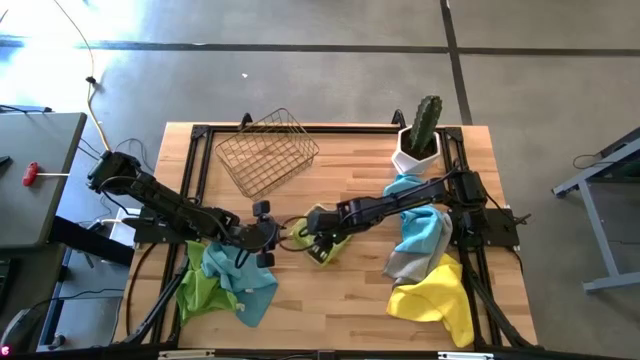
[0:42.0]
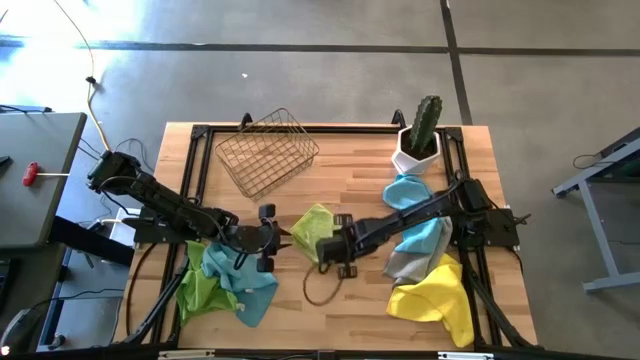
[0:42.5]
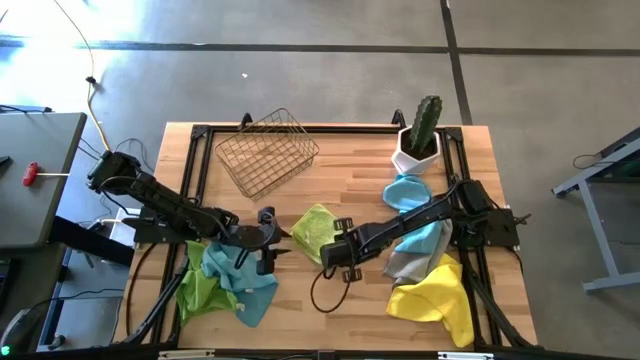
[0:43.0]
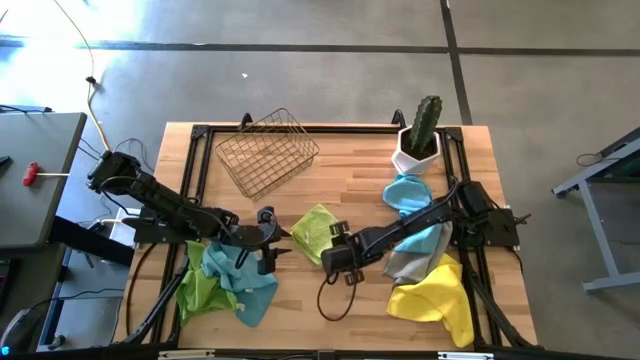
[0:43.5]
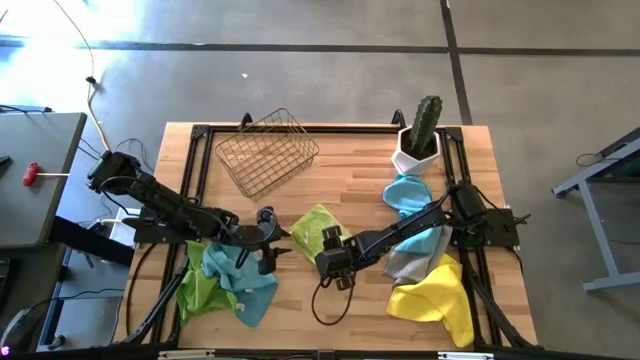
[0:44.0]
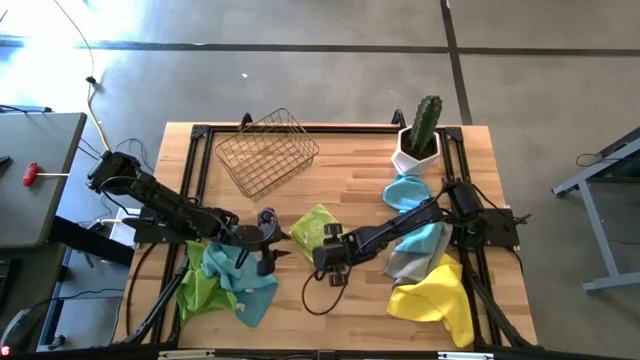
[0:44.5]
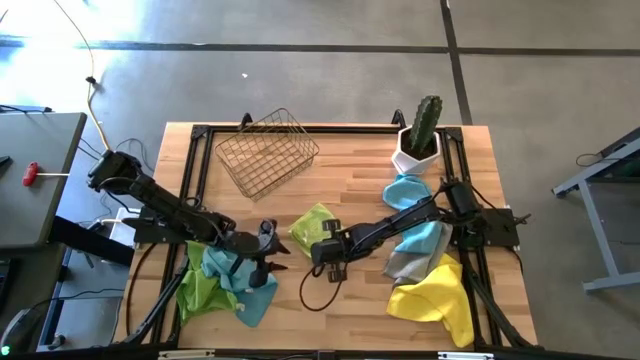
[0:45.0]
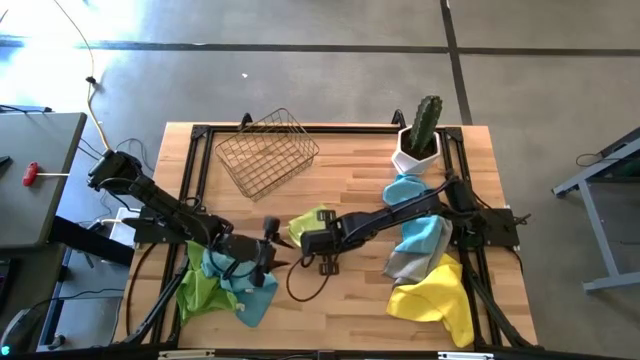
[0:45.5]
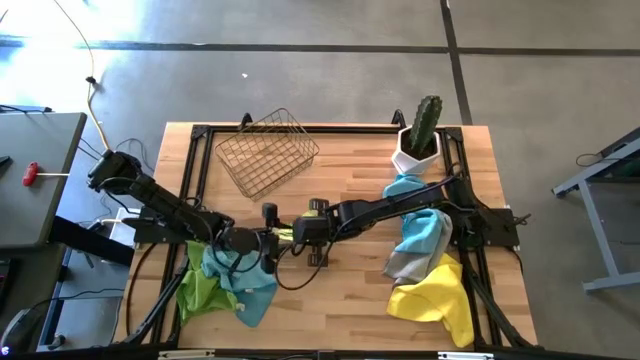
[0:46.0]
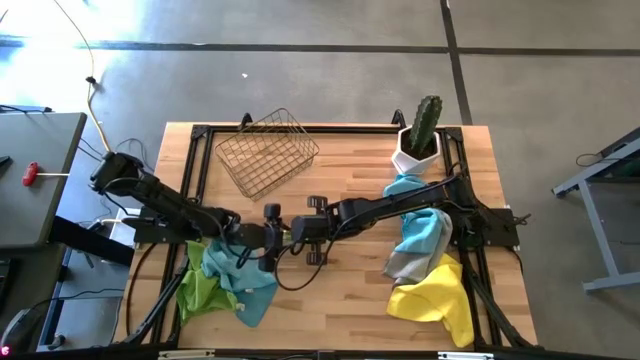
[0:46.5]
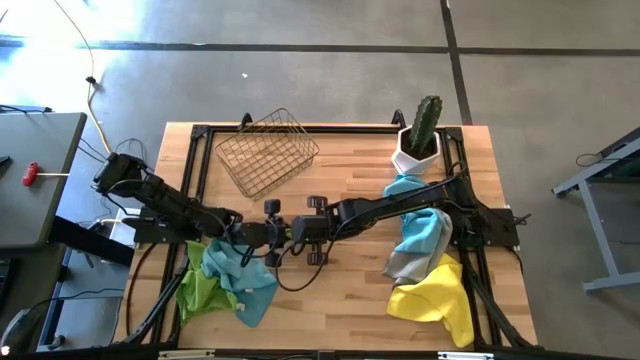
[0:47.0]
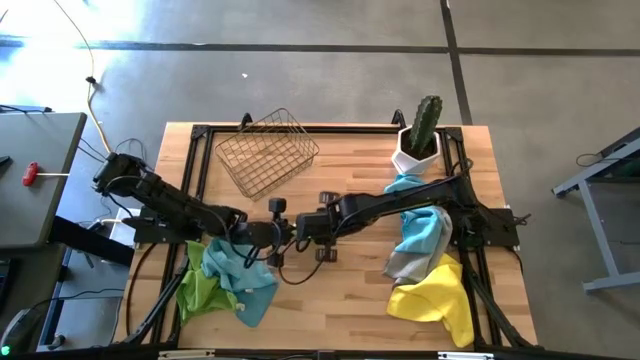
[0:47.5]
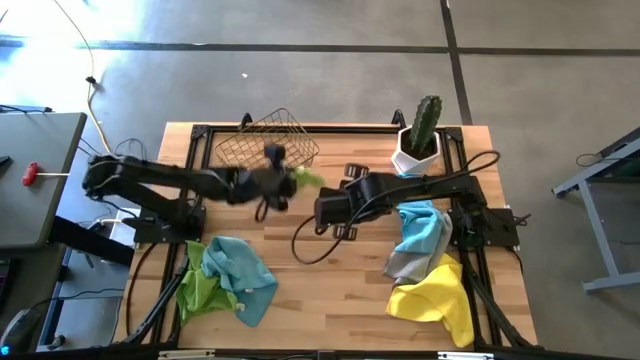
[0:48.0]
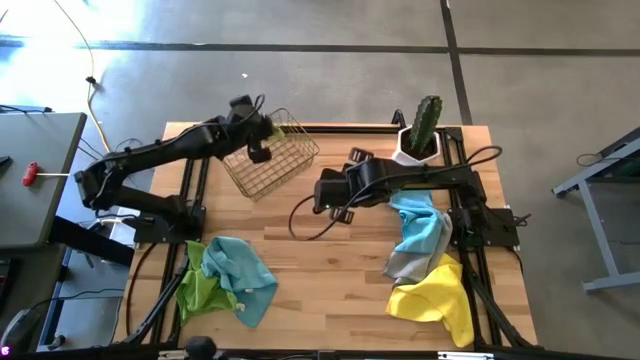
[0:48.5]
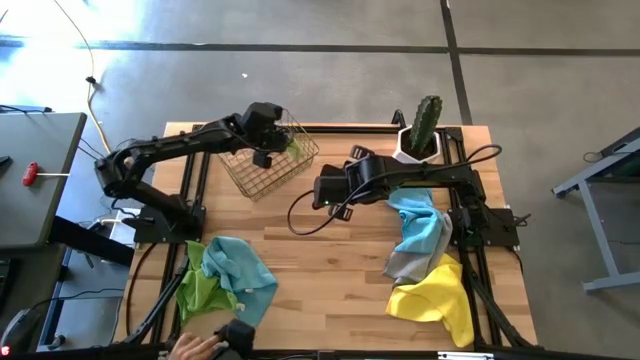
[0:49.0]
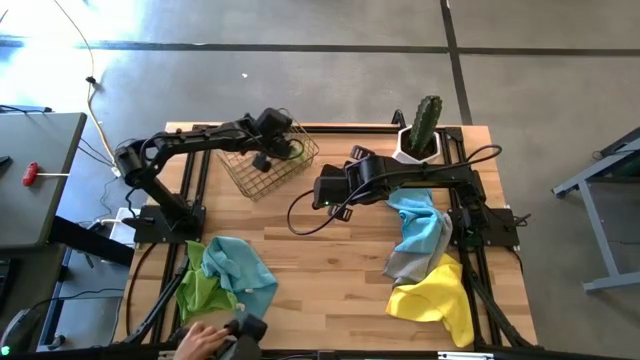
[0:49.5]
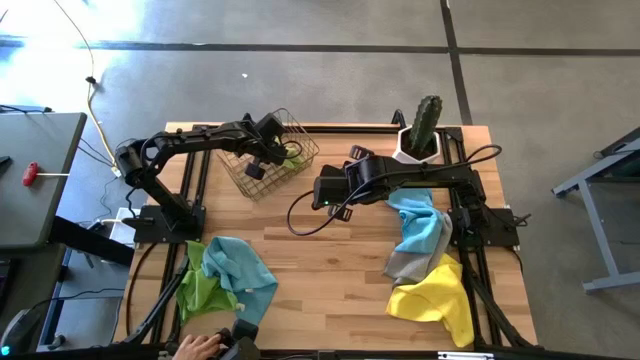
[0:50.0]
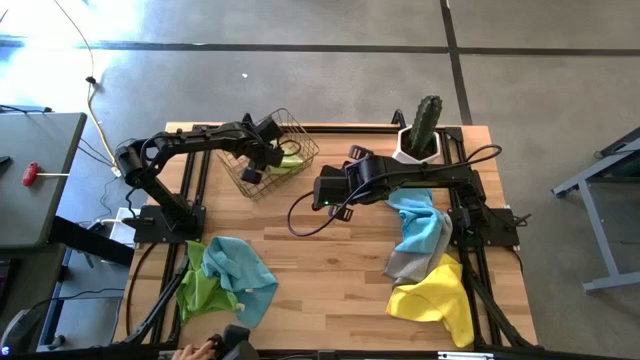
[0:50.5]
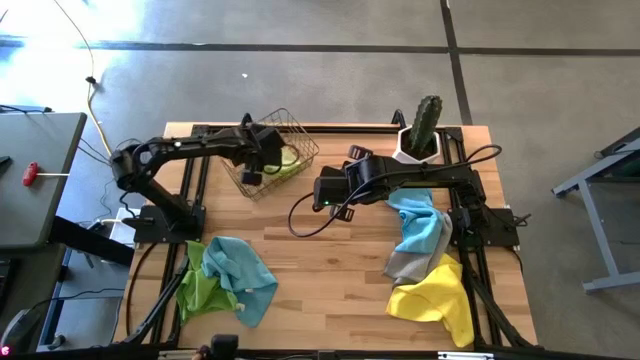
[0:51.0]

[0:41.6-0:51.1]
Task: Fold microfiber towels
Put the folded light green microfiber towel into the wire basket

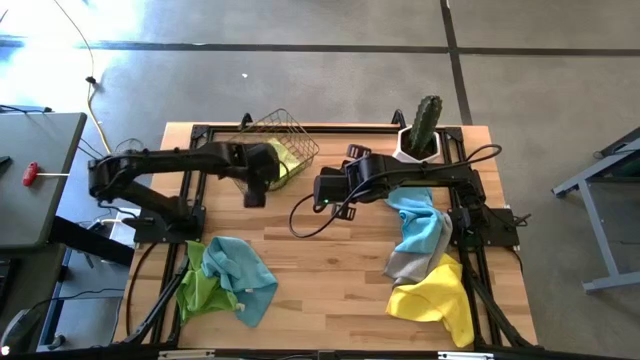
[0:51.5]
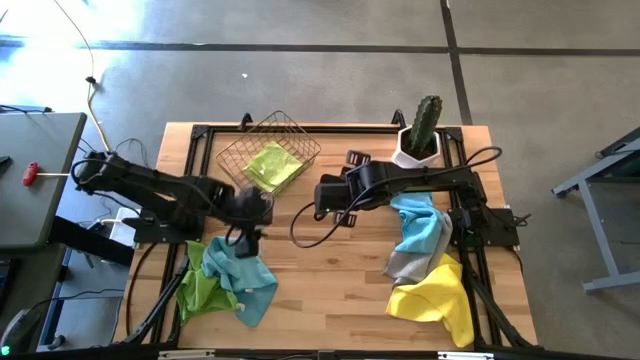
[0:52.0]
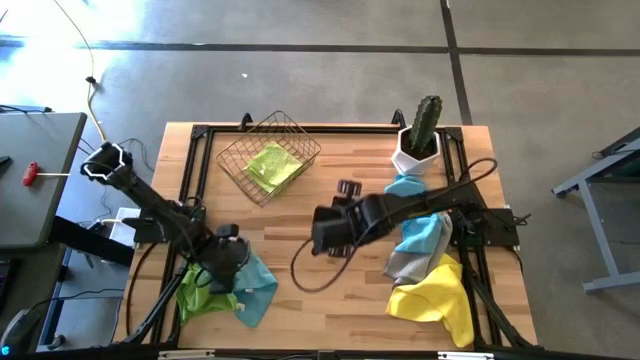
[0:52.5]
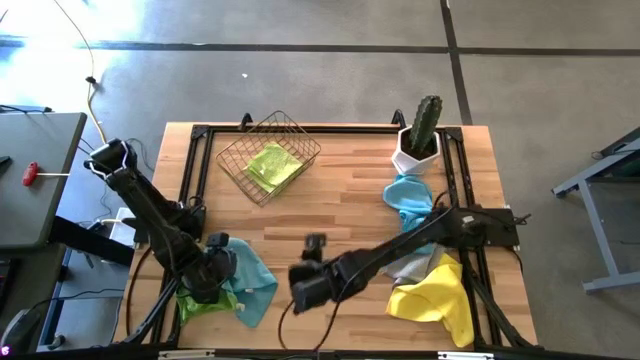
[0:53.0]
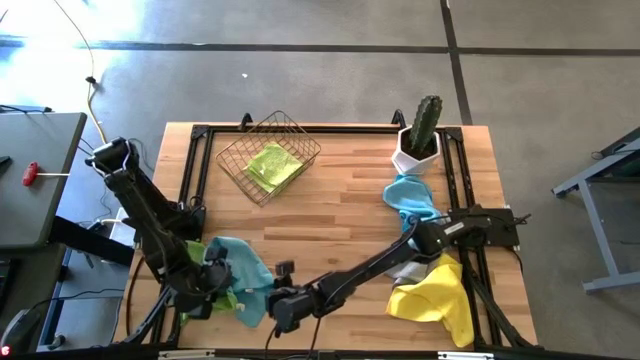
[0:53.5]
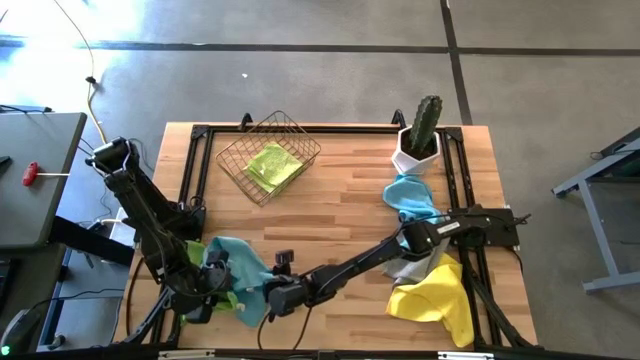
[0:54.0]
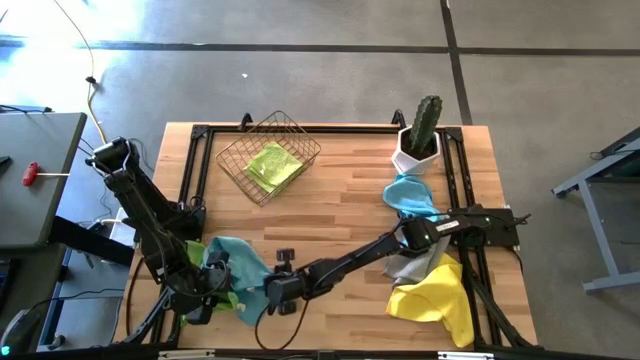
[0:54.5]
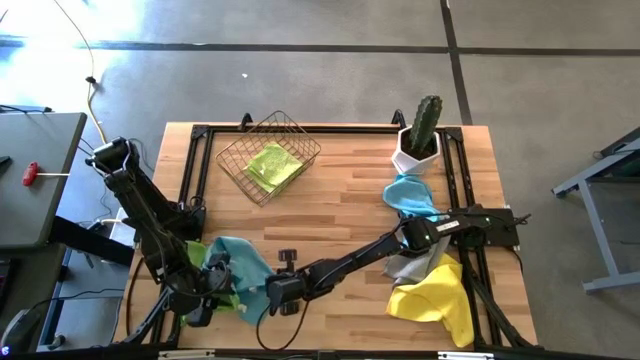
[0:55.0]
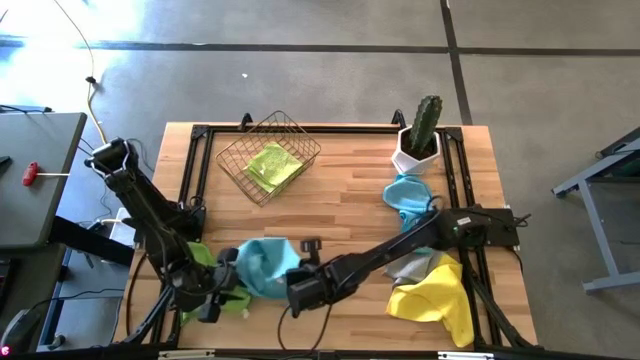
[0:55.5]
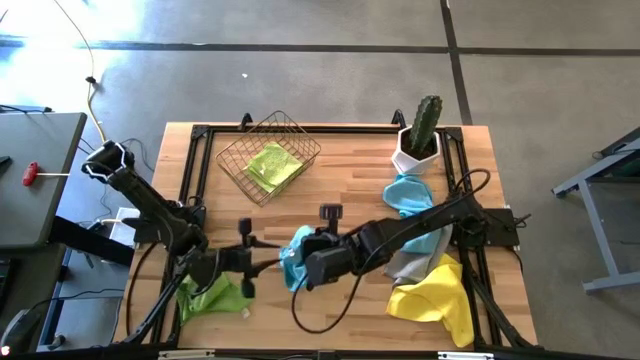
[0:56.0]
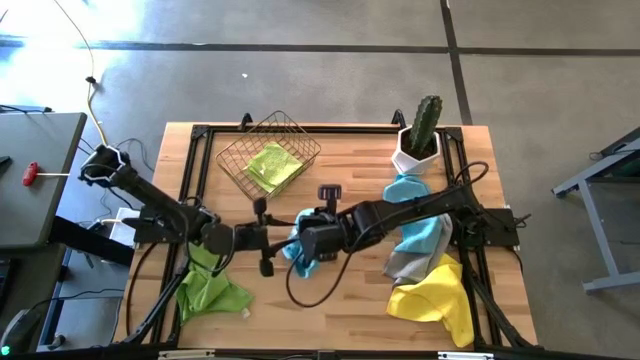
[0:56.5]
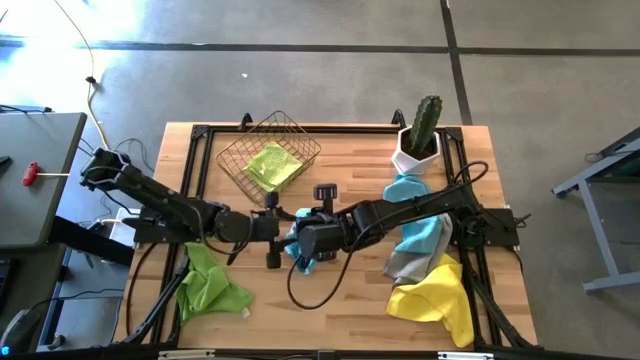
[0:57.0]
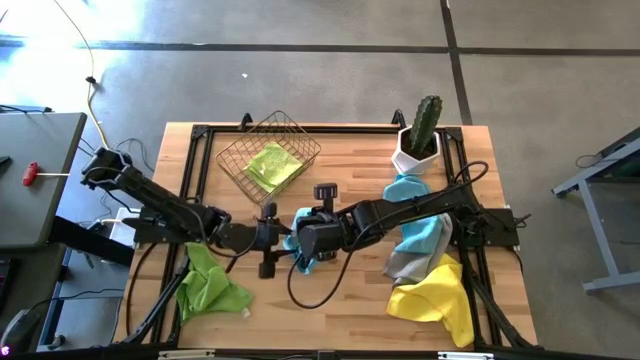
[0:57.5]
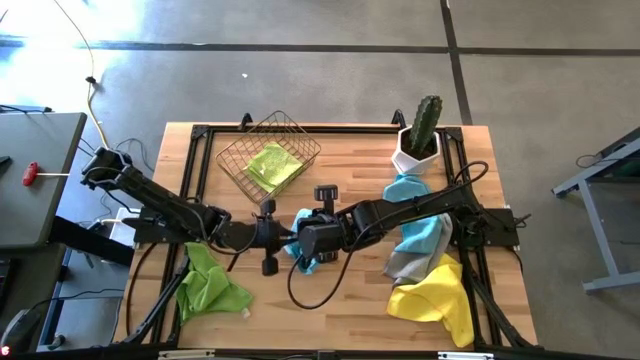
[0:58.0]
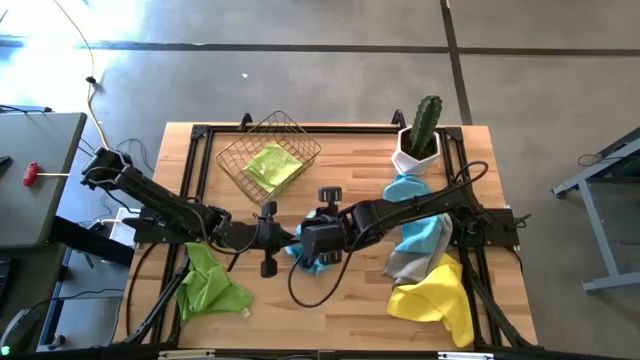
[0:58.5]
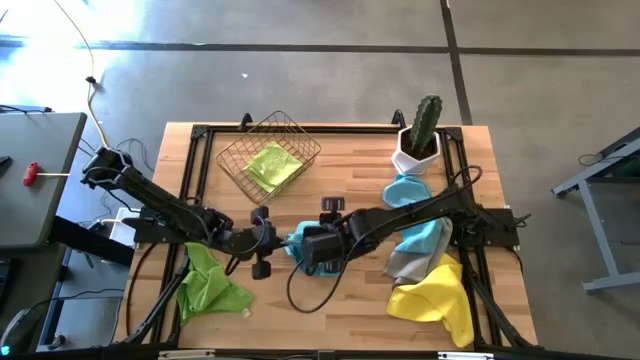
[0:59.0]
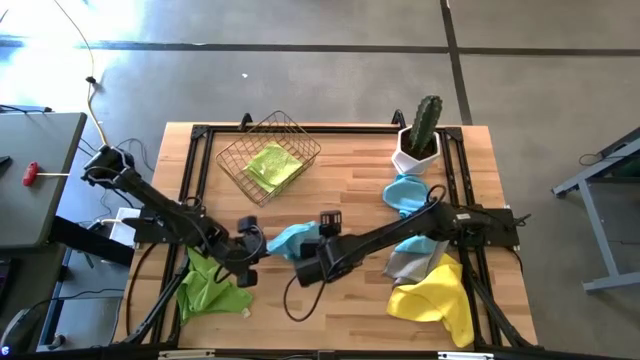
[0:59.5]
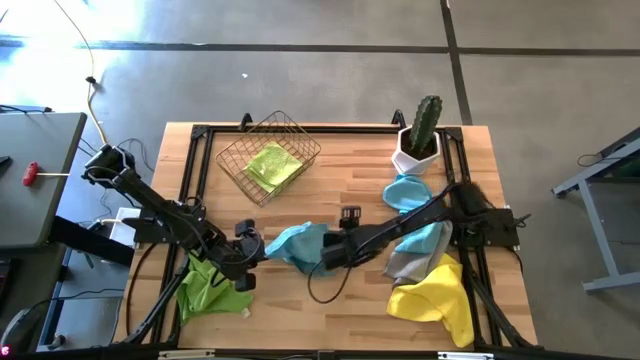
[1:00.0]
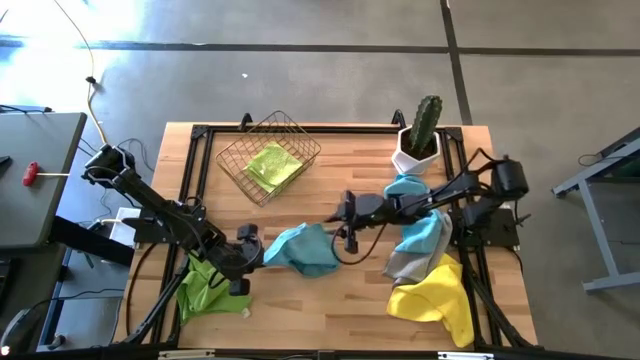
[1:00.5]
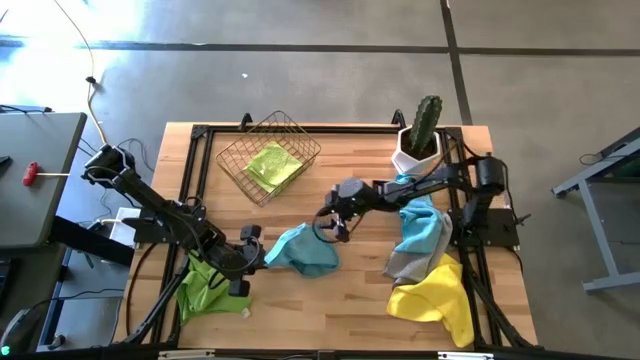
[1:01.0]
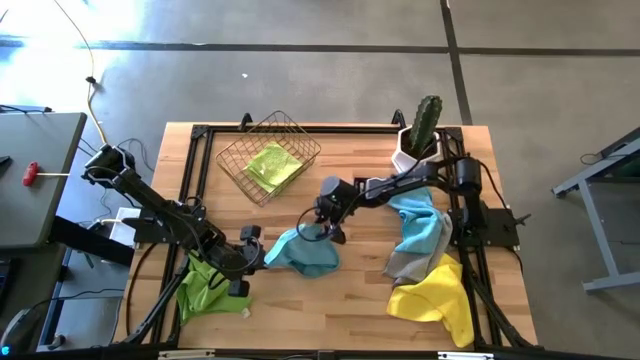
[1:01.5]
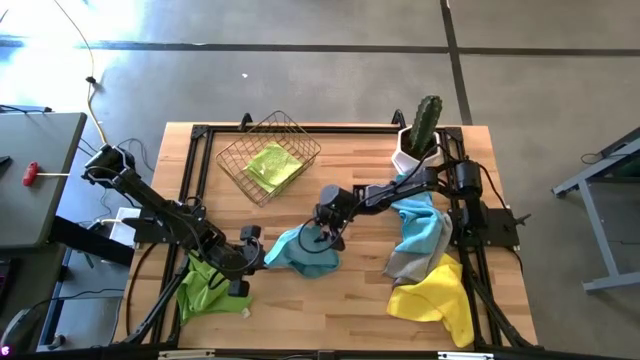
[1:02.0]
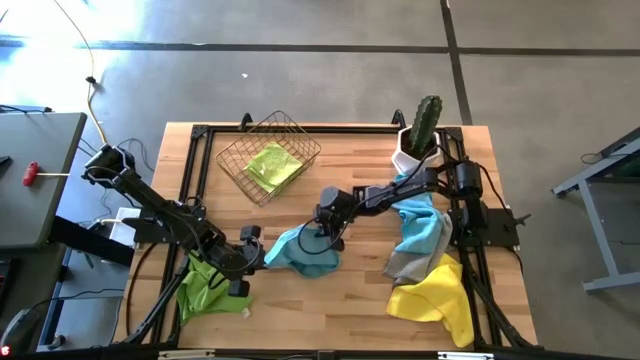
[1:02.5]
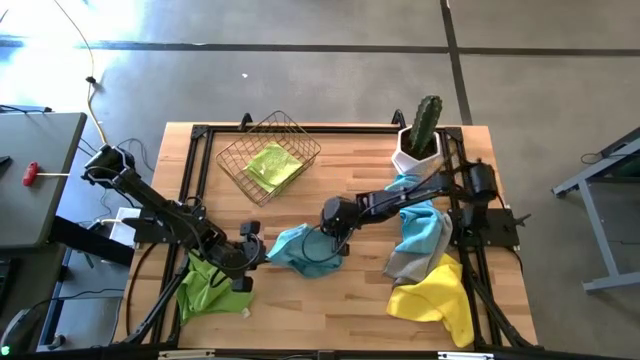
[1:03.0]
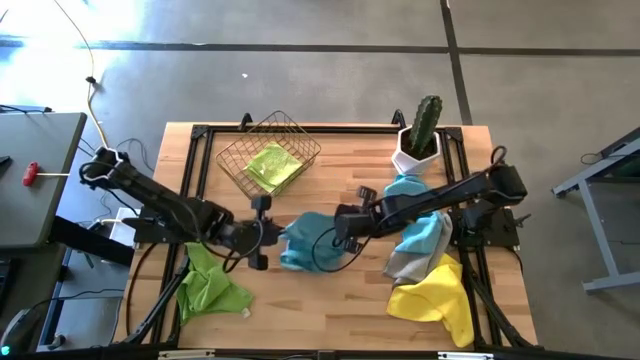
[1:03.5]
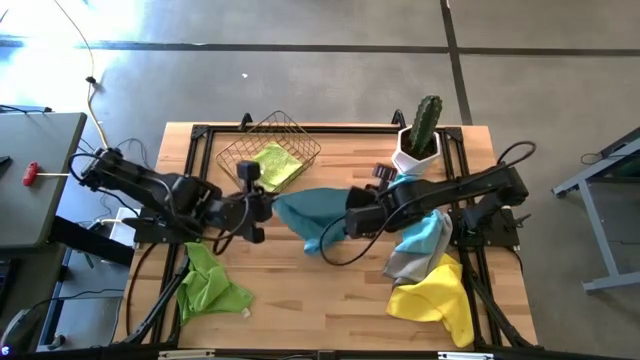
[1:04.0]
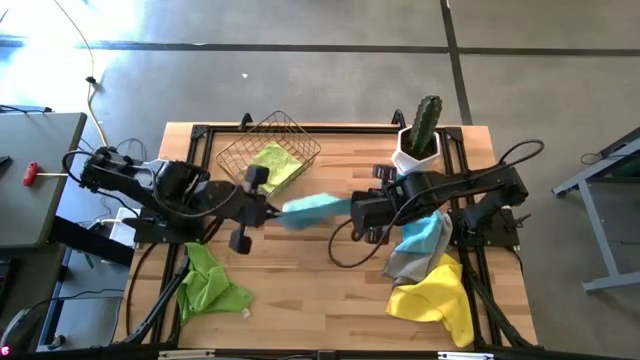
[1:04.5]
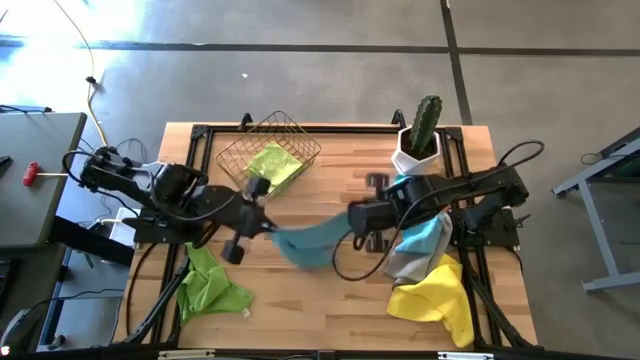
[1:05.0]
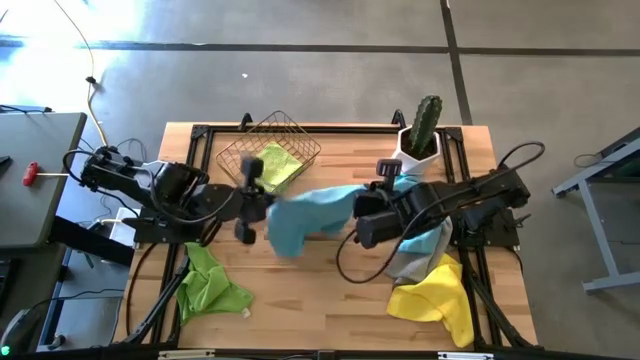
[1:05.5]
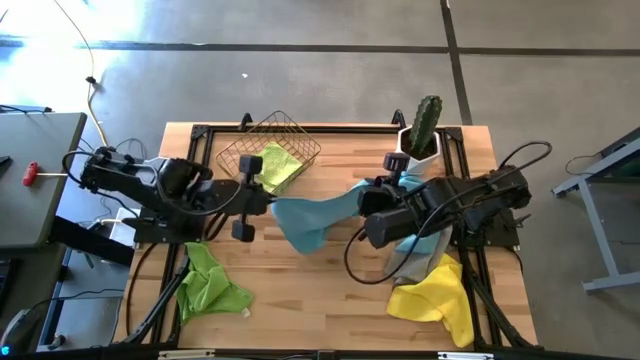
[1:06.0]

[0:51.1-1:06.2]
Fold the bottom light blue microfiber towel
